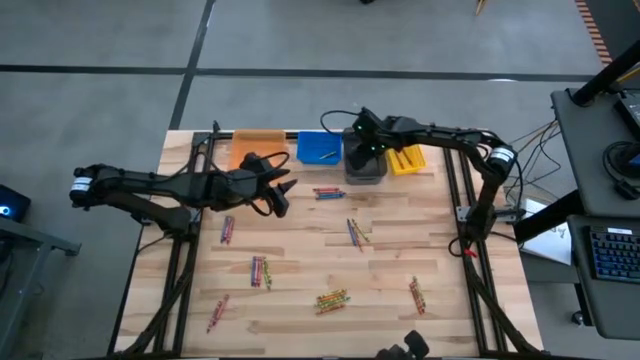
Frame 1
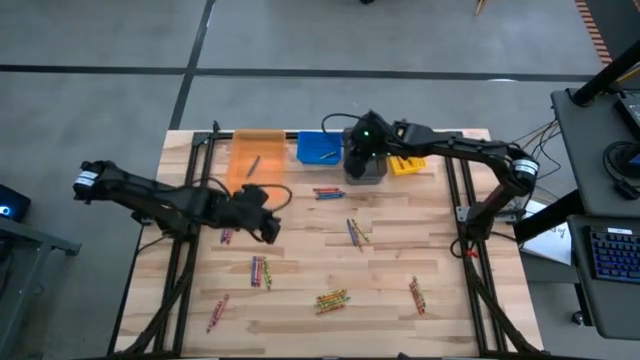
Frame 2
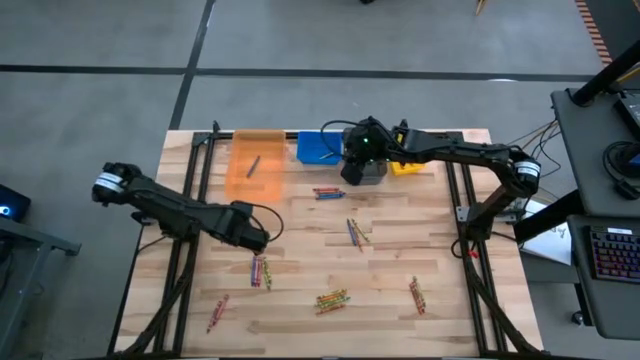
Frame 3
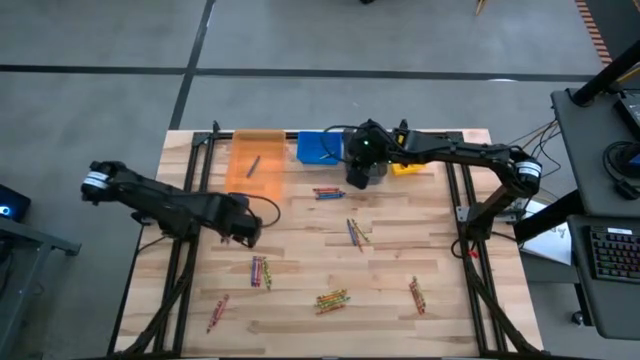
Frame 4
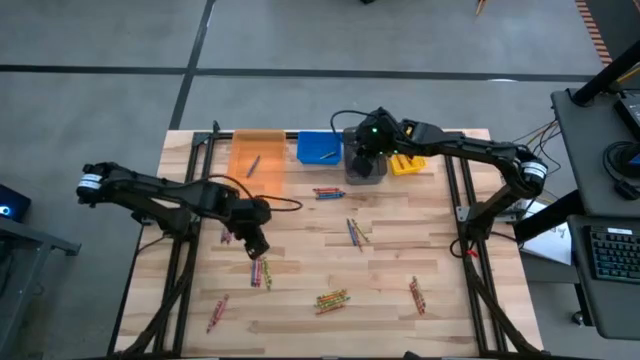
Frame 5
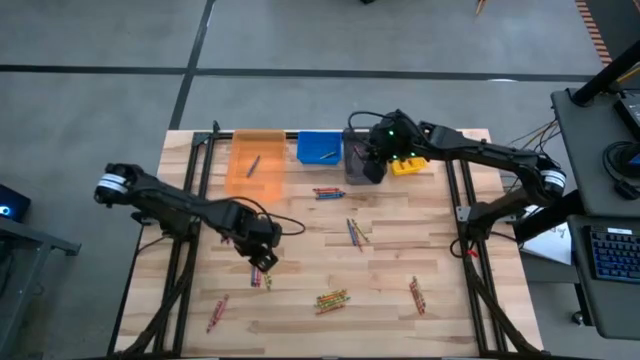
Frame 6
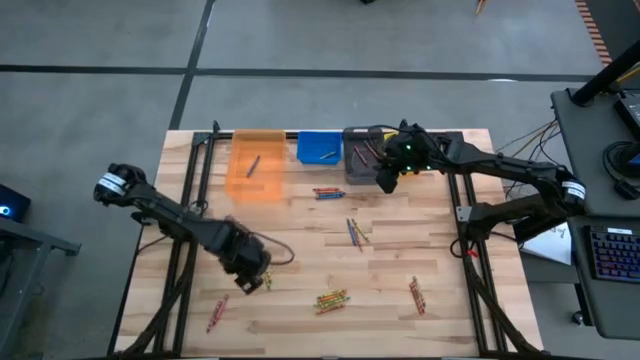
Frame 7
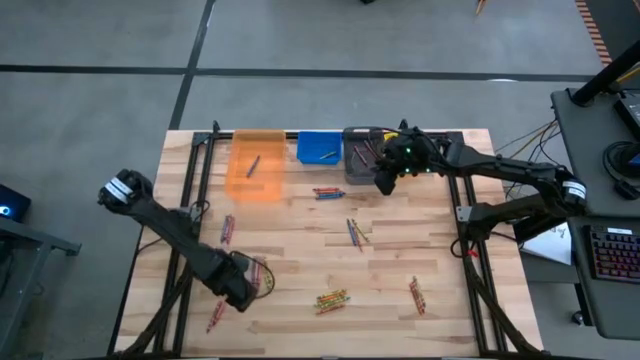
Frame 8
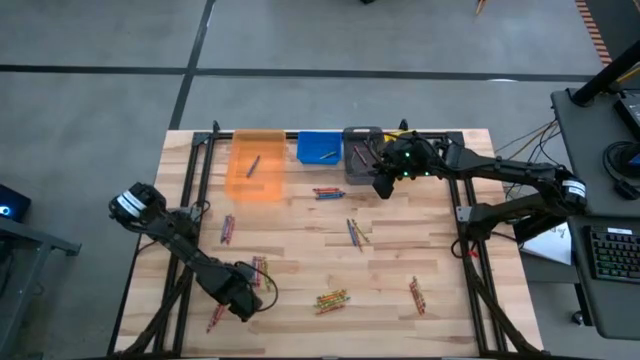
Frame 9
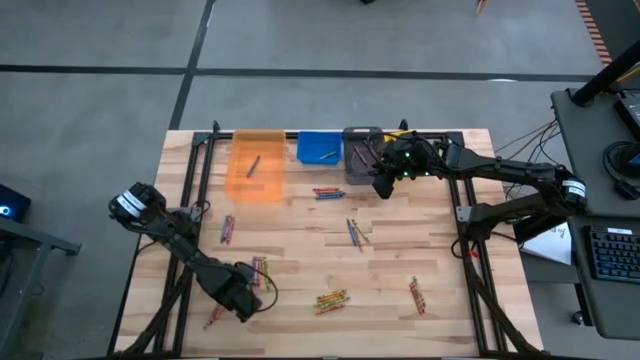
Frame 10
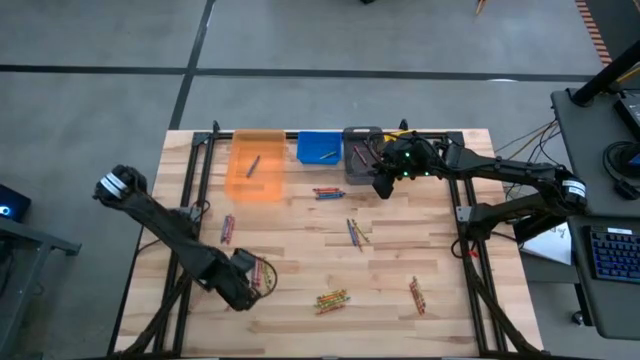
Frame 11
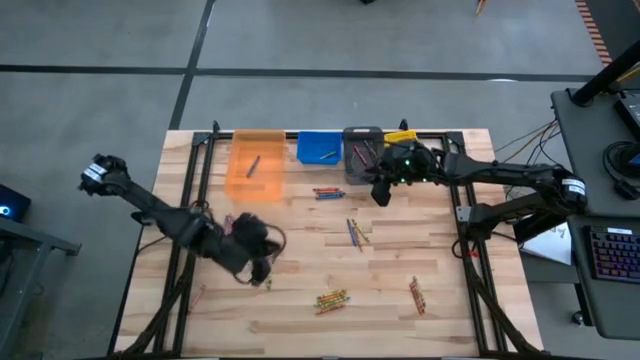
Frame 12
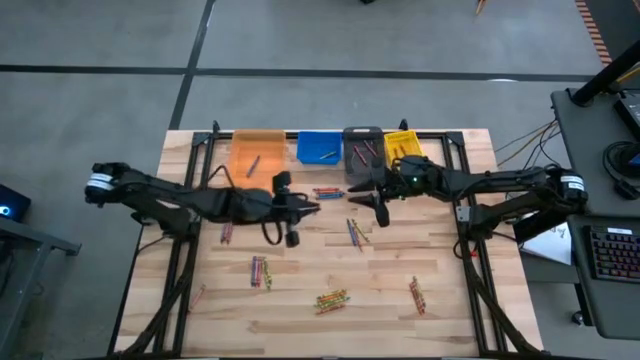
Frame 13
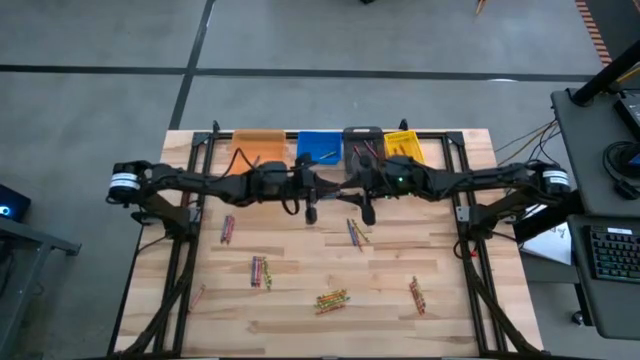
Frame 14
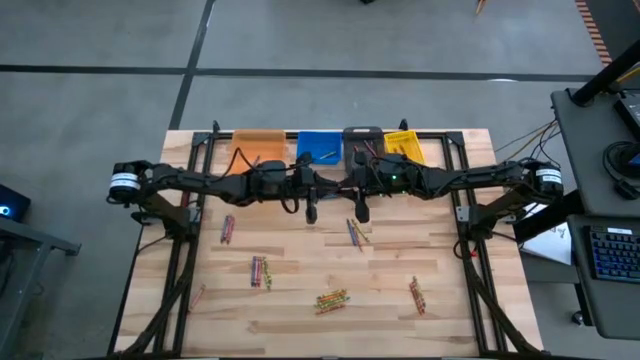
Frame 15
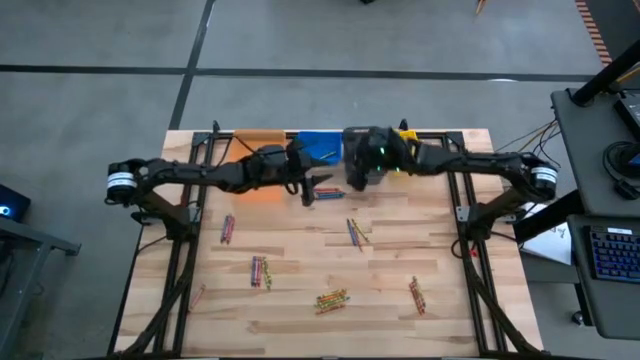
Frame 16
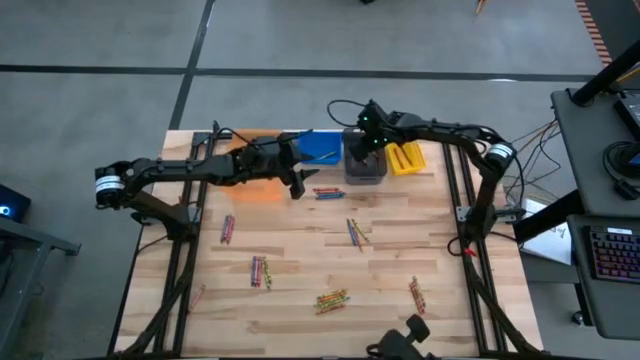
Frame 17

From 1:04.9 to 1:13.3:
Task: Sort crayons
Put the red crayon into the black bin

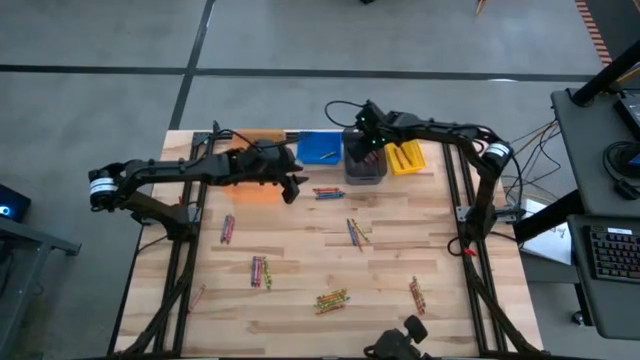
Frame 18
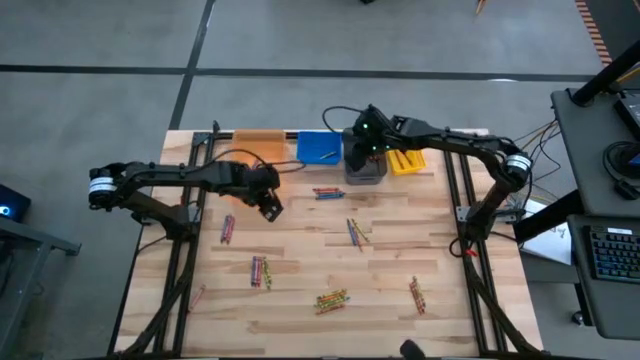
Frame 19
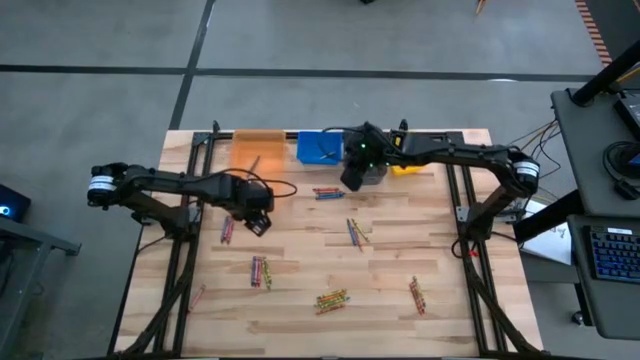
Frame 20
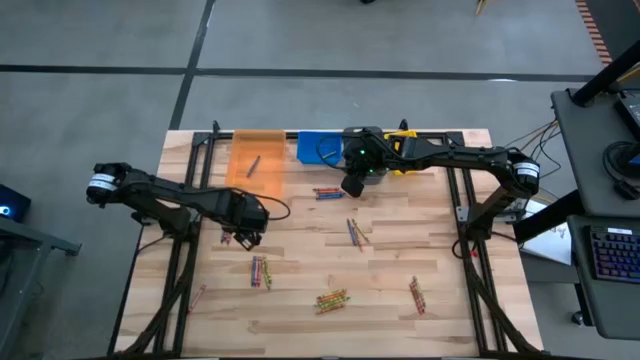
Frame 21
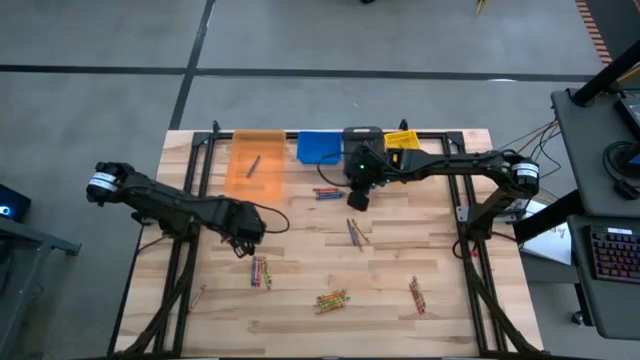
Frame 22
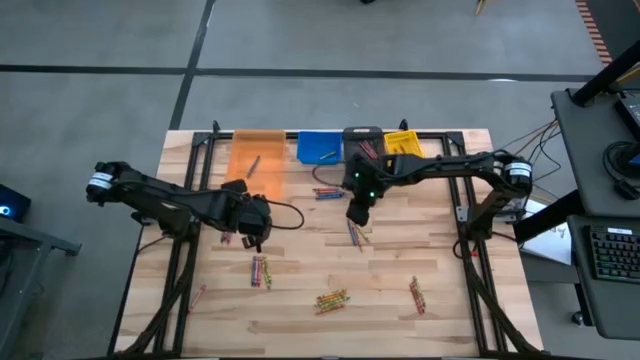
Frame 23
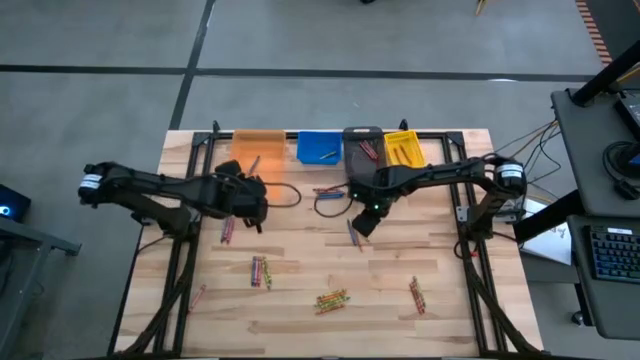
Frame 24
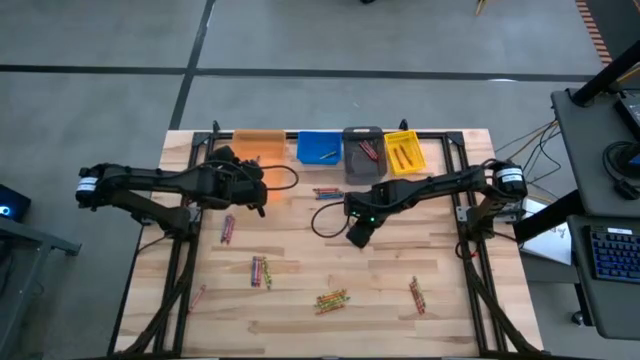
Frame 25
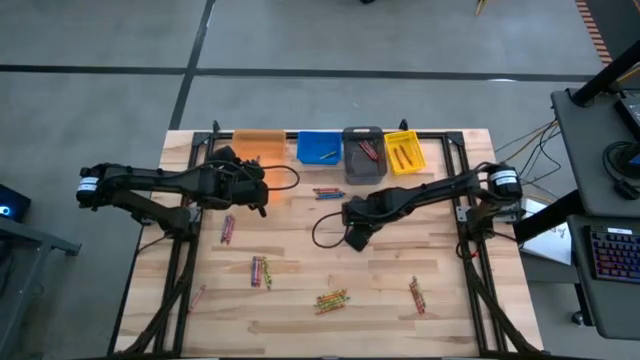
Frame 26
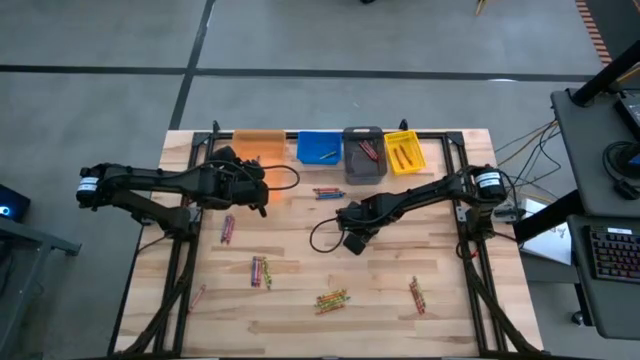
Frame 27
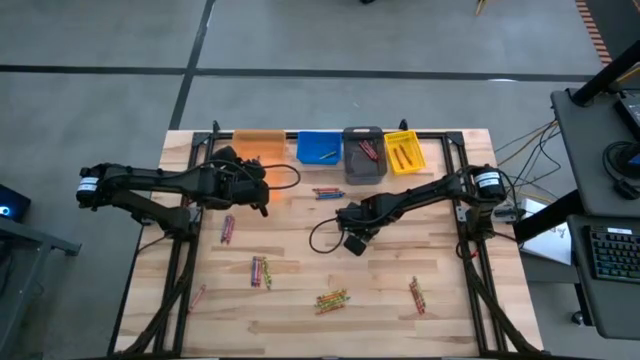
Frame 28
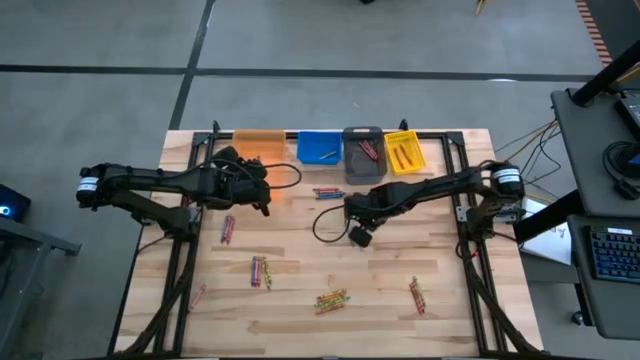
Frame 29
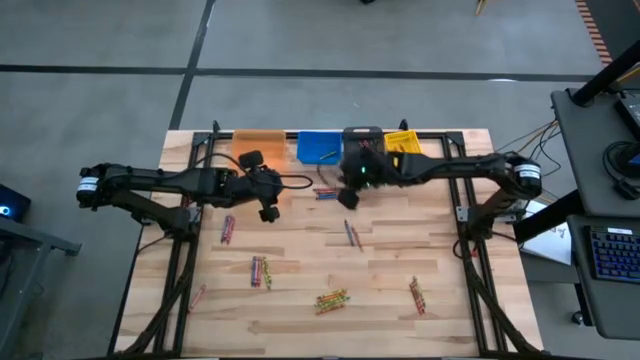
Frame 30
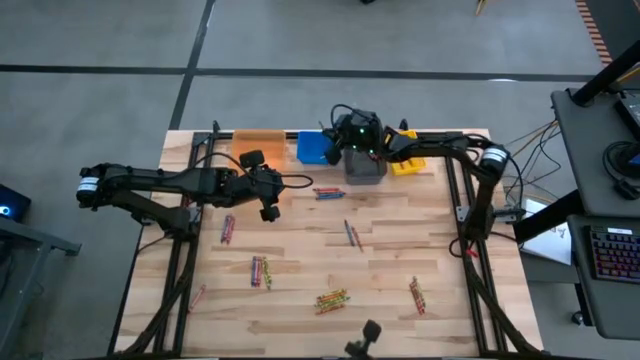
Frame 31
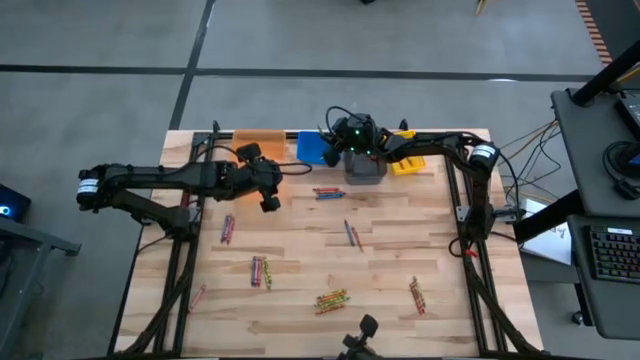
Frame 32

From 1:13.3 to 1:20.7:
Put the green crayon into the blue bin

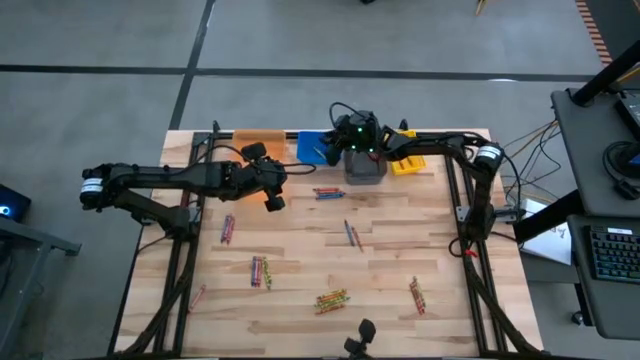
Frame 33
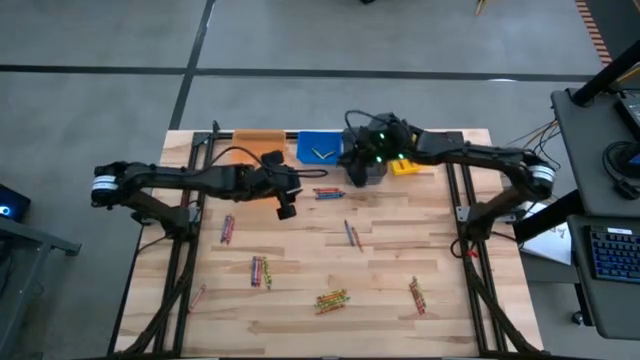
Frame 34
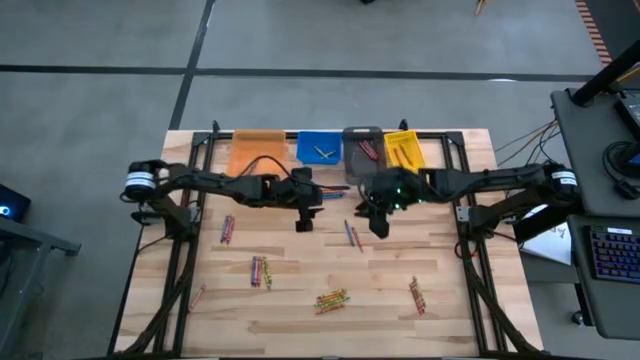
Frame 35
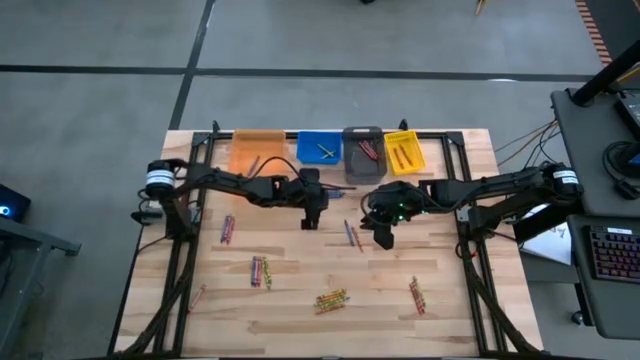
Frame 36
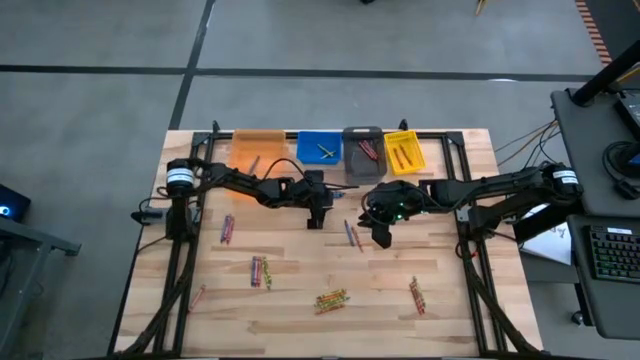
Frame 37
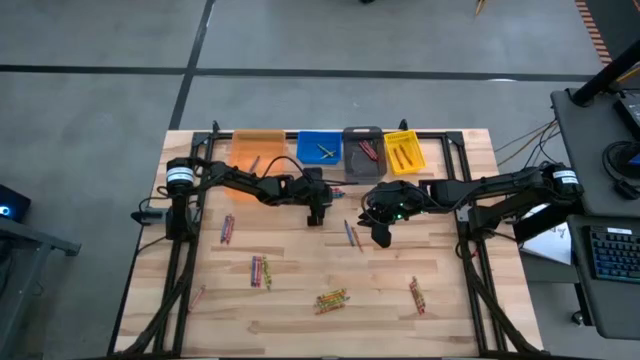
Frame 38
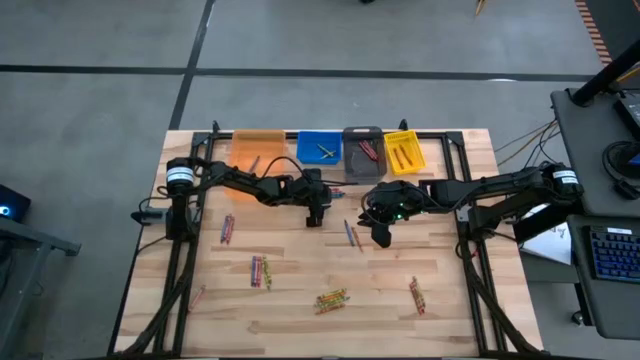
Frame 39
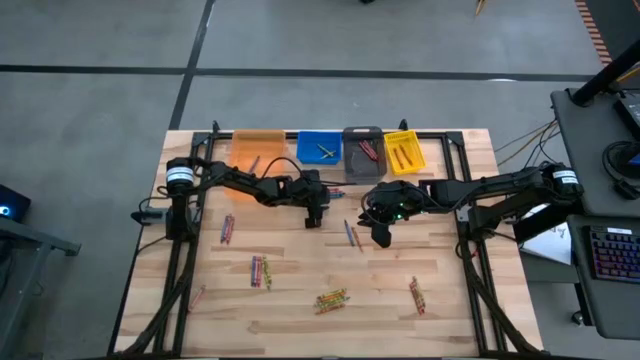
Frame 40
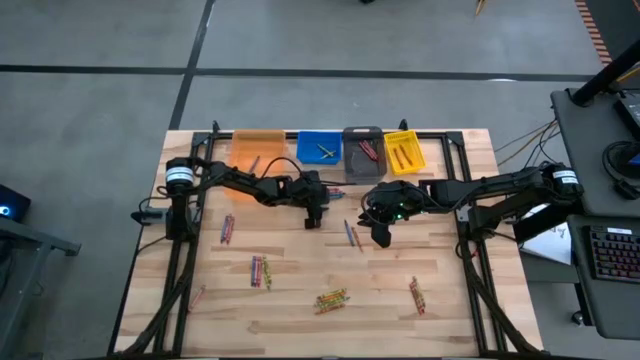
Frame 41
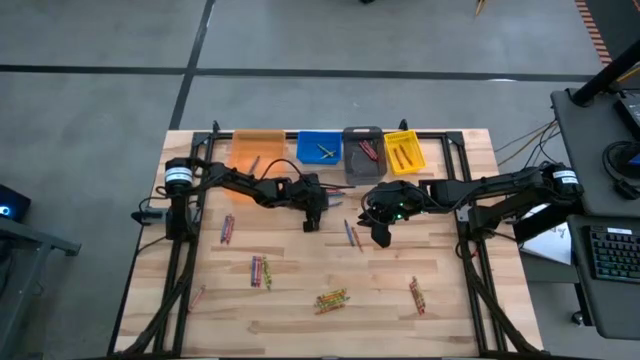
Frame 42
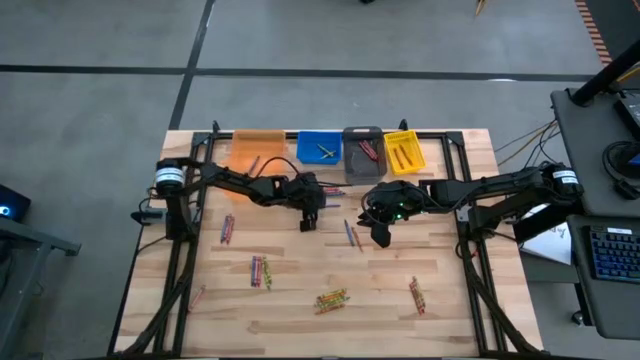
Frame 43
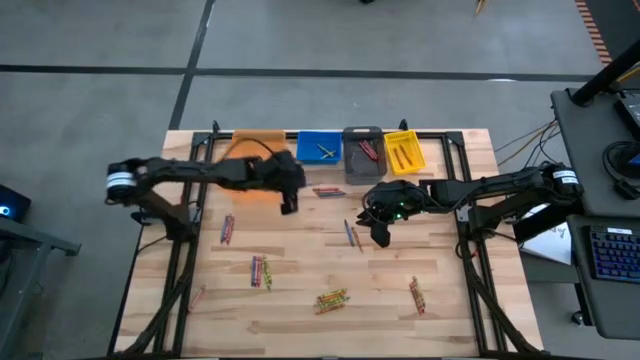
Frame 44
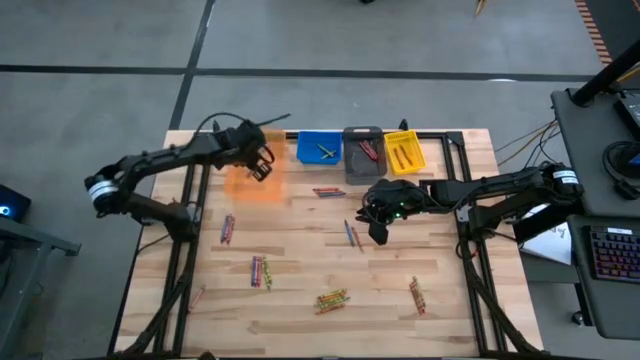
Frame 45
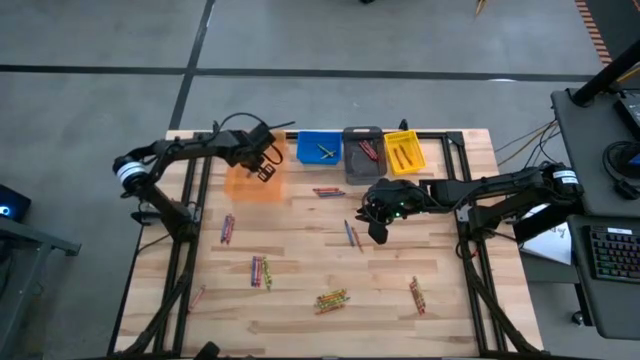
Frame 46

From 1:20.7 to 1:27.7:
Put the blue crayon into the orange bin
